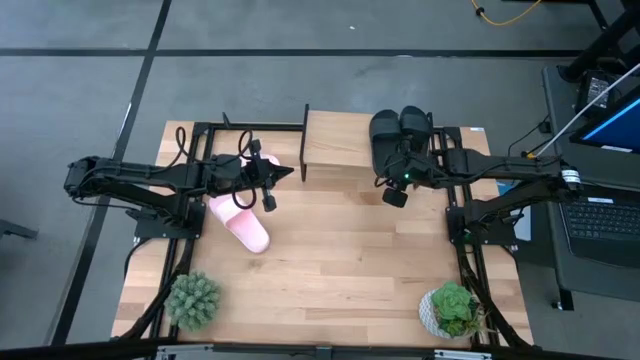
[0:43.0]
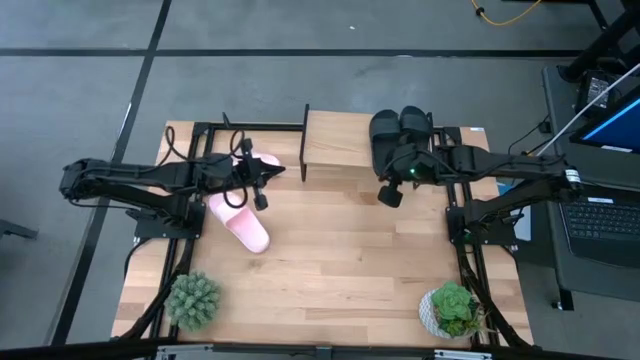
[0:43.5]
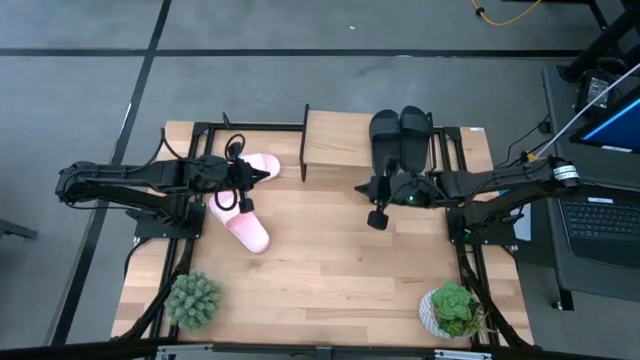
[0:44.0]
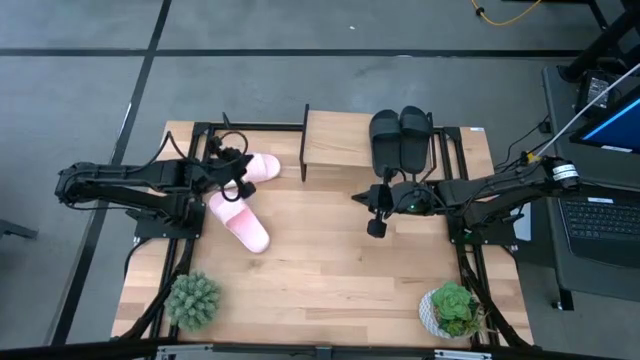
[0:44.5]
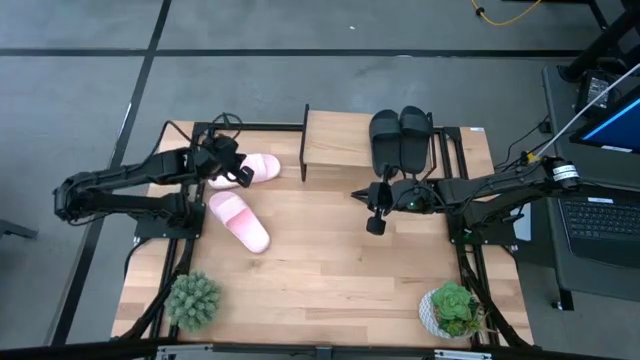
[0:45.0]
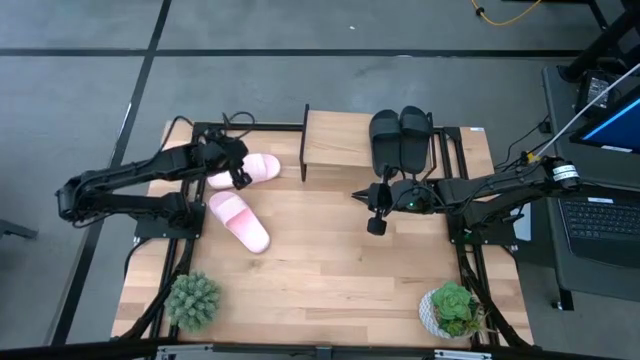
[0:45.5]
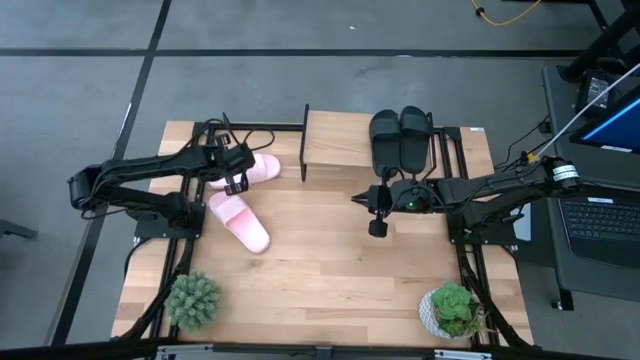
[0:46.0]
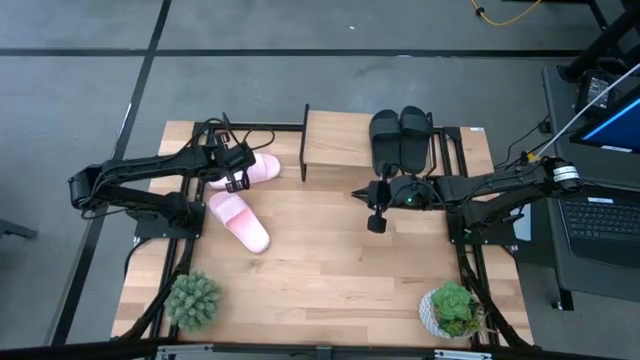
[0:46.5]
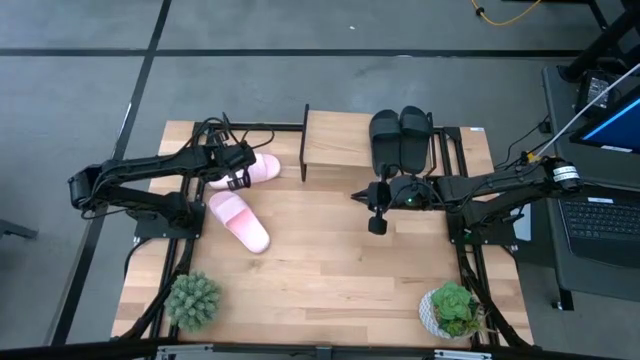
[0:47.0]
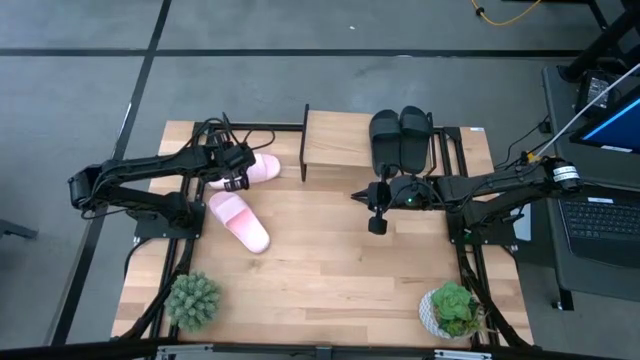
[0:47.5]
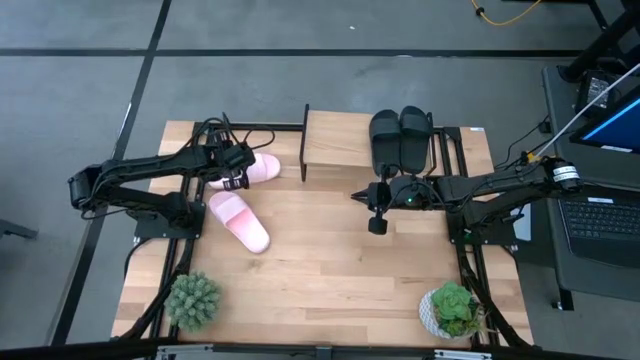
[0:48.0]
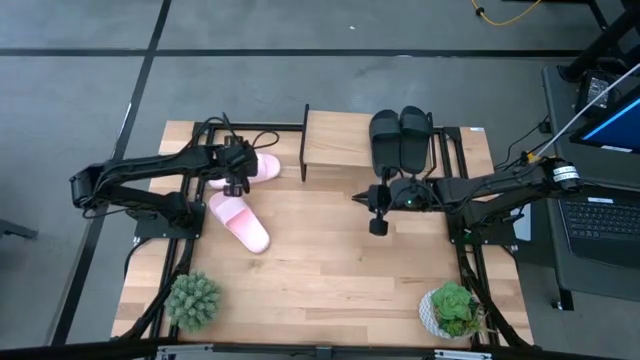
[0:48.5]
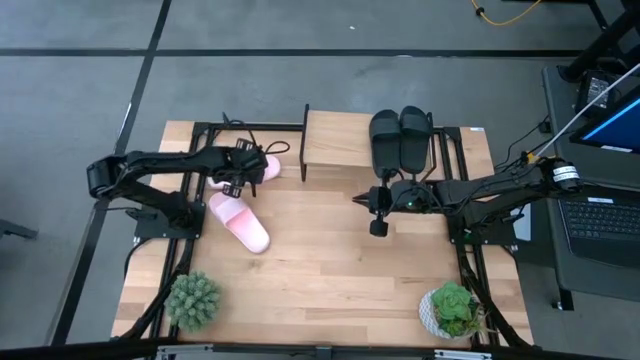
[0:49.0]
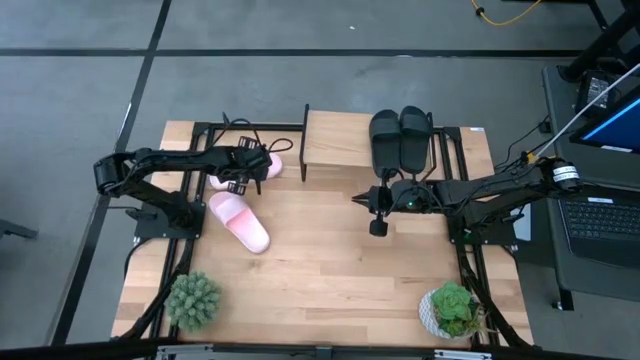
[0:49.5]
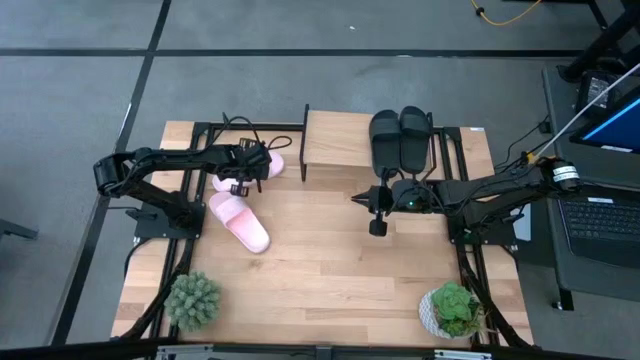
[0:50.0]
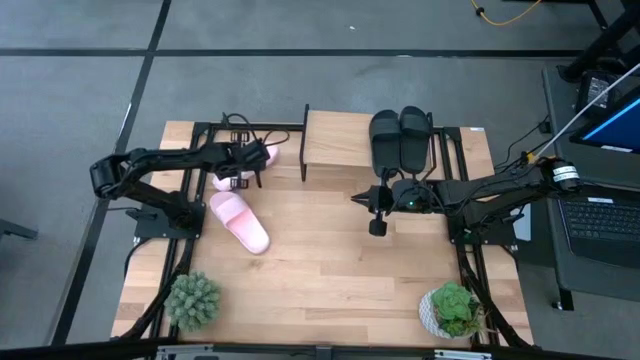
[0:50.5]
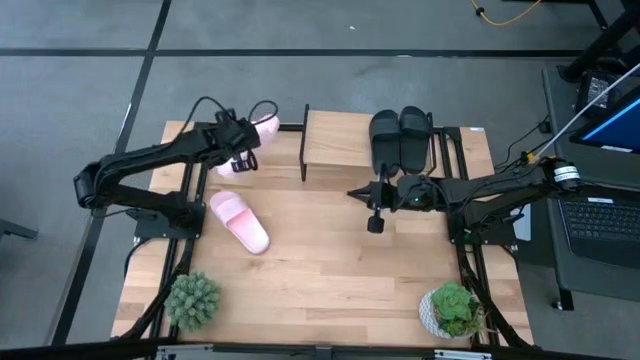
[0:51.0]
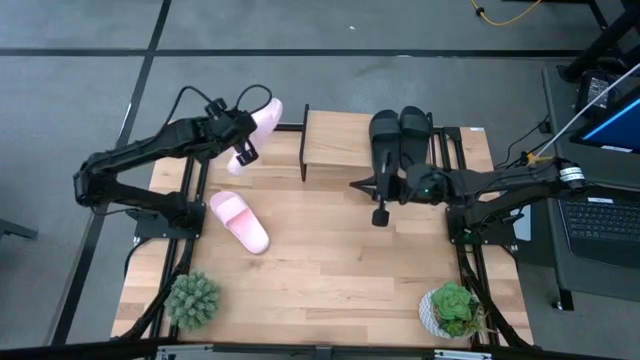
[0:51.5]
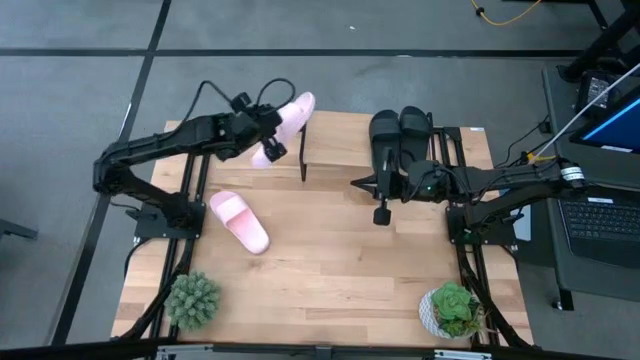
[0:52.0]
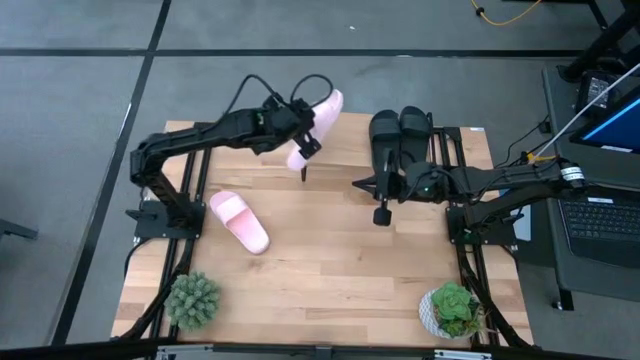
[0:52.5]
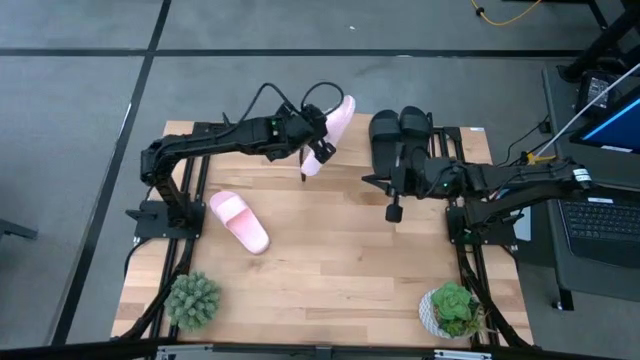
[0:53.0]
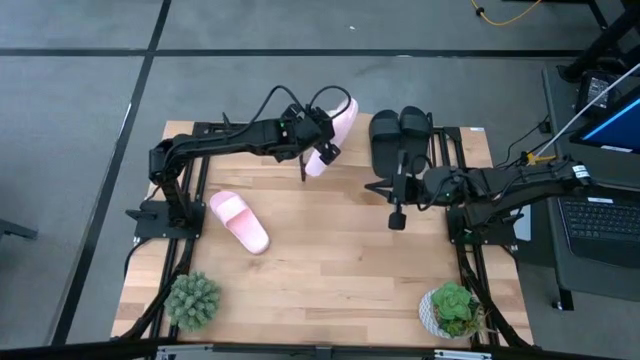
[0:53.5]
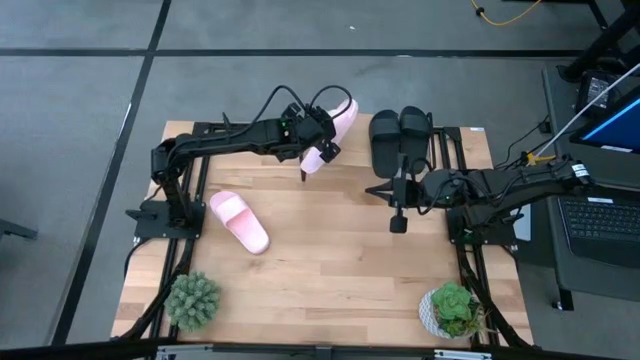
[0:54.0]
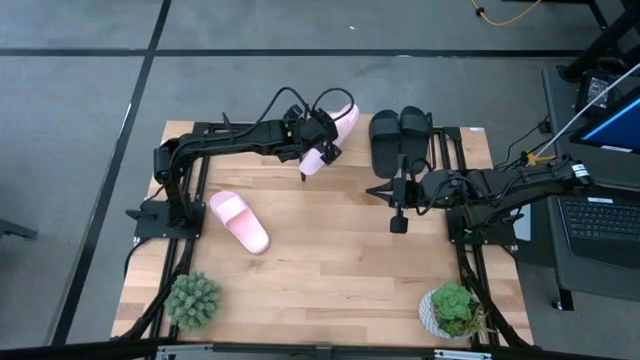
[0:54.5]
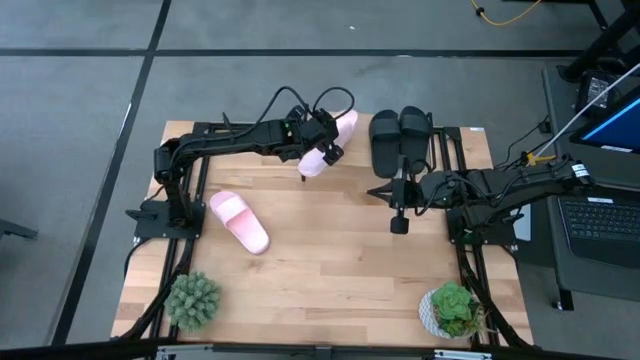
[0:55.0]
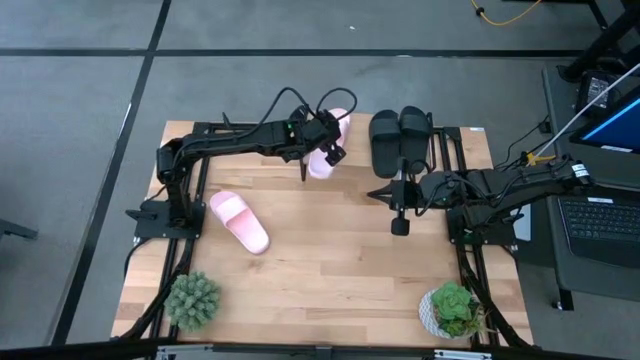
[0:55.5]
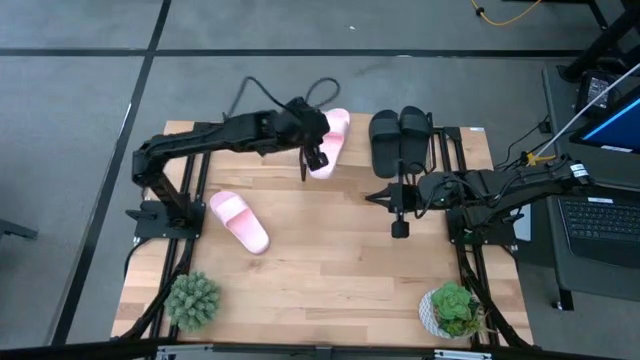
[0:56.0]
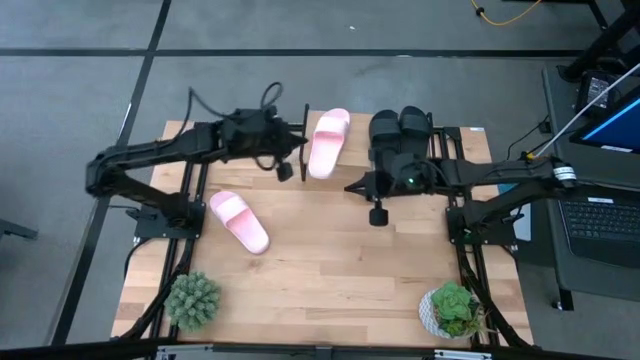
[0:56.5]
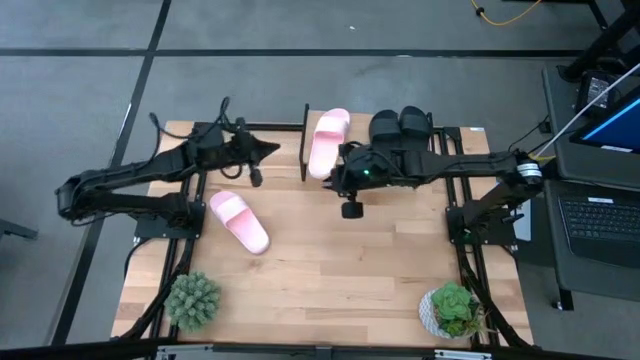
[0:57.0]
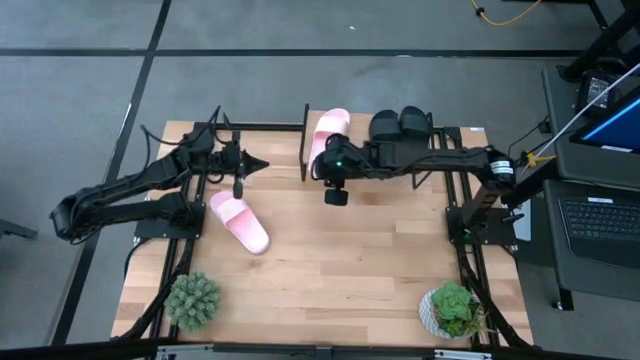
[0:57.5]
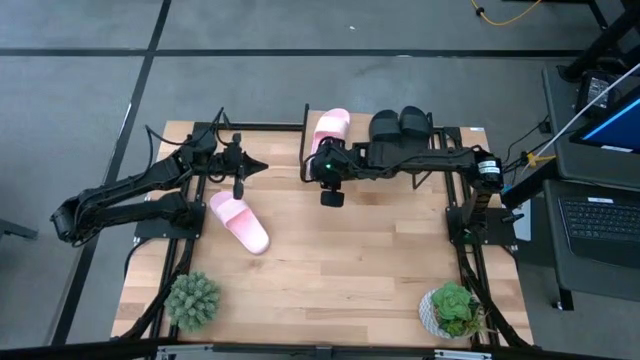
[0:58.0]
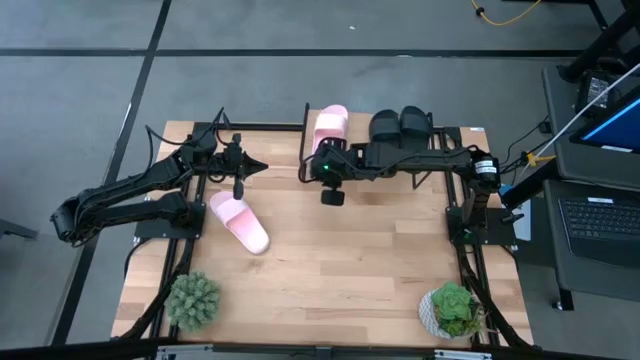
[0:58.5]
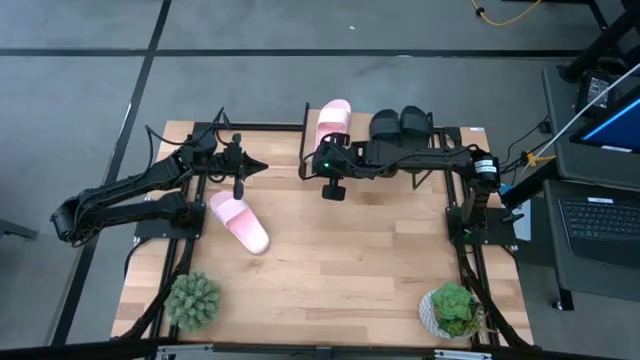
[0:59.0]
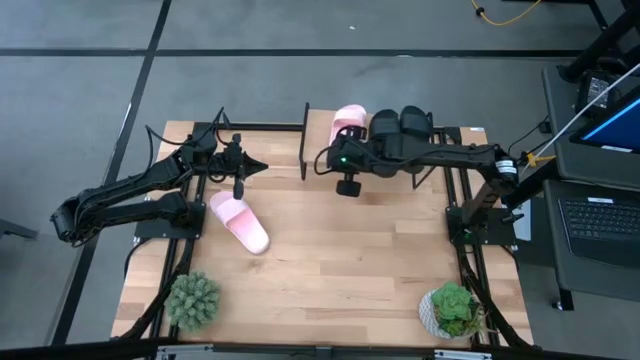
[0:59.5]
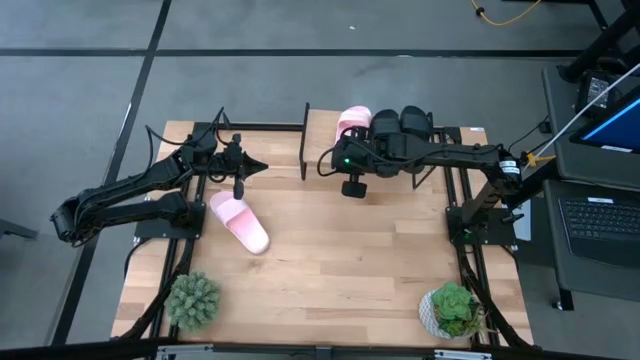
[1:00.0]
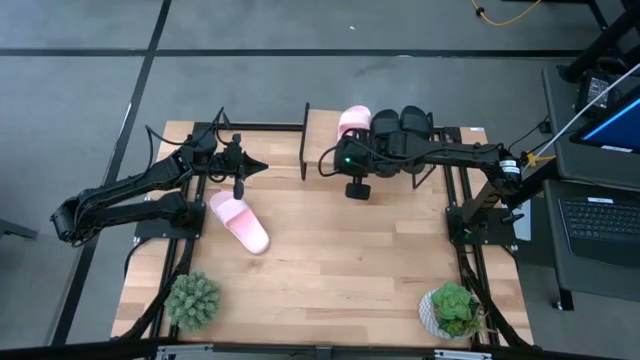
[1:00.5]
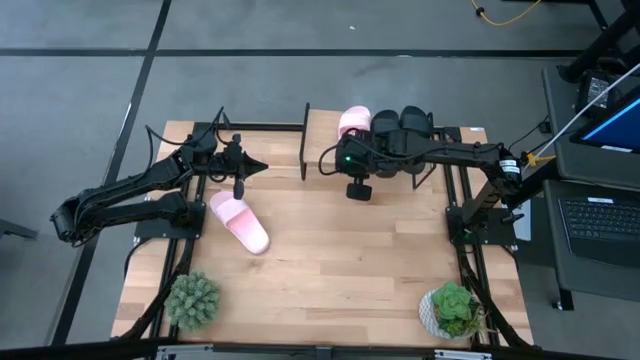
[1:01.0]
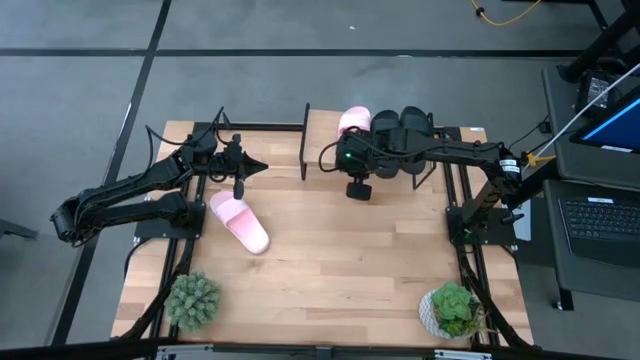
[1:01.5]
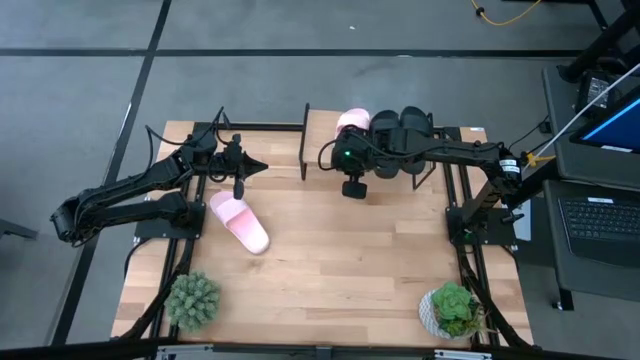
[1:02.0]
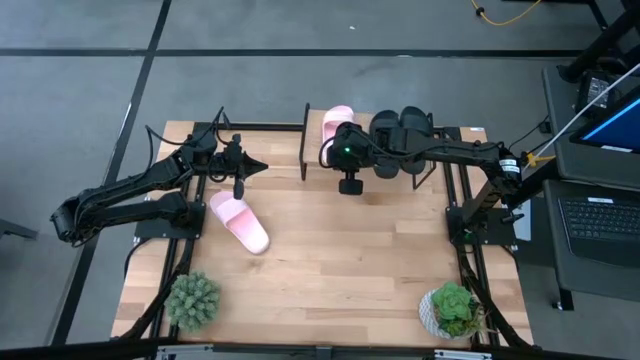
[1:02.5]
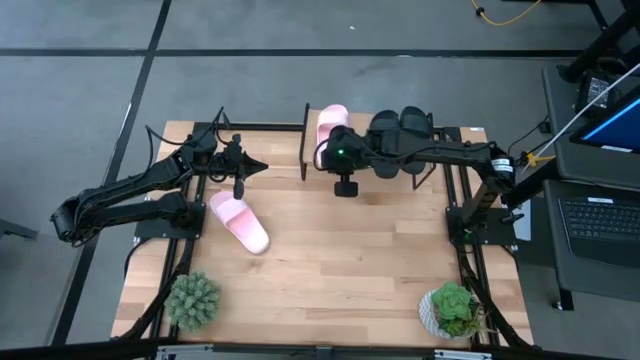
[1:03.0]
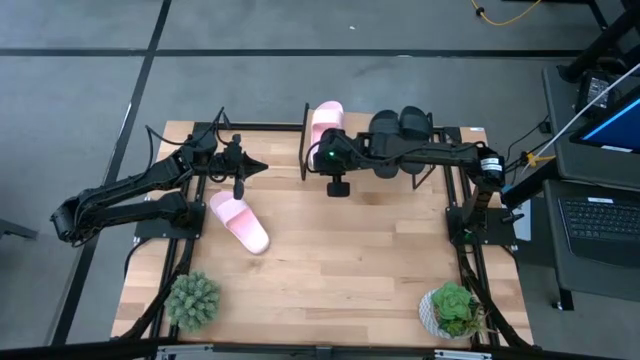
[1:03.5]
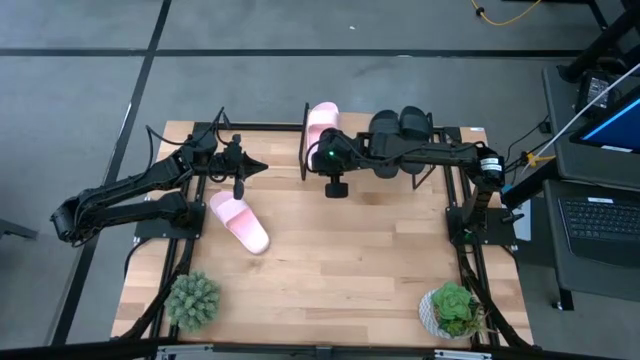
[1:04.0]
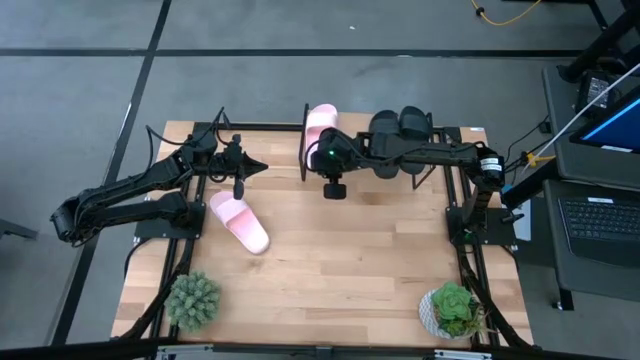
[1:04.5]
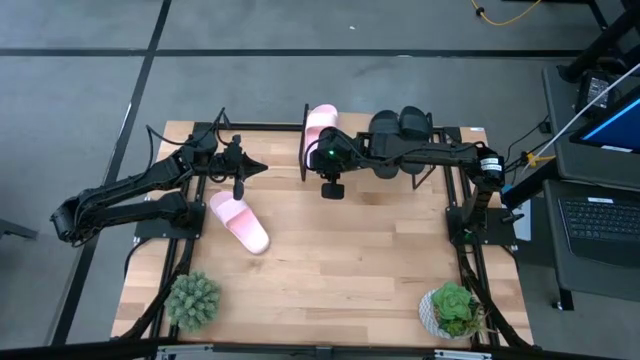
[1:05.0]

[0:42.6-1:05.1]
Task: Pick and place slides into the shelf
Put the top pink slides on the shelf
